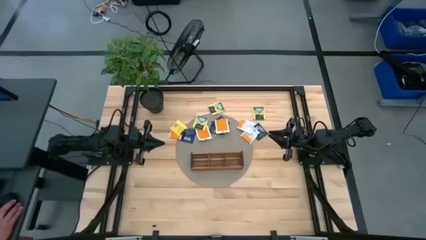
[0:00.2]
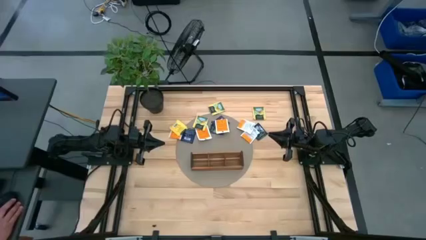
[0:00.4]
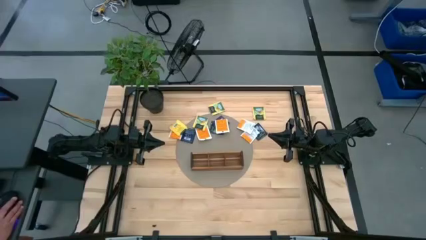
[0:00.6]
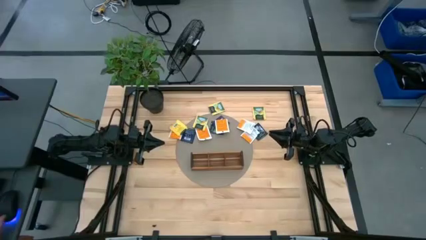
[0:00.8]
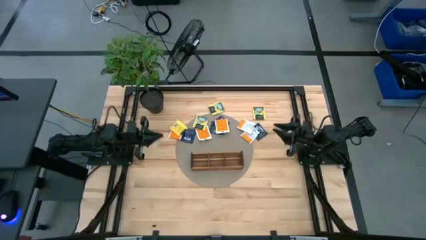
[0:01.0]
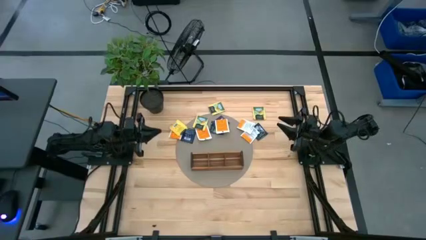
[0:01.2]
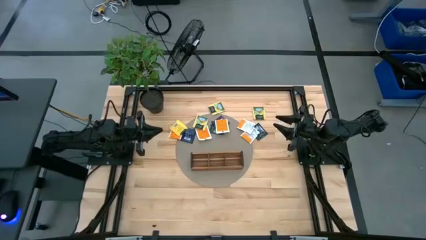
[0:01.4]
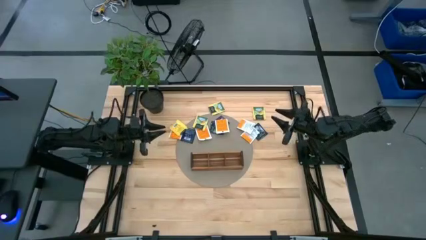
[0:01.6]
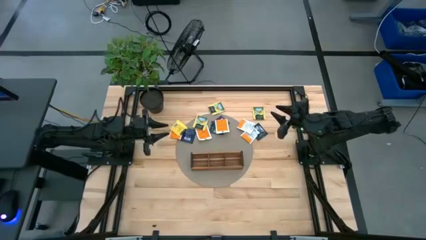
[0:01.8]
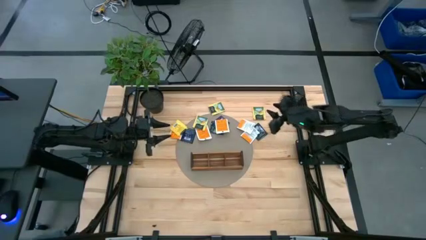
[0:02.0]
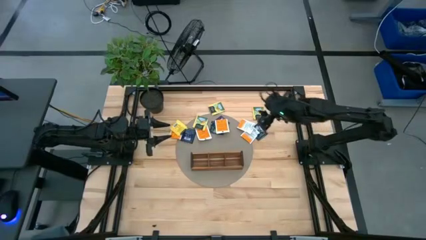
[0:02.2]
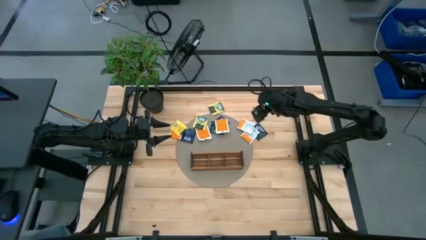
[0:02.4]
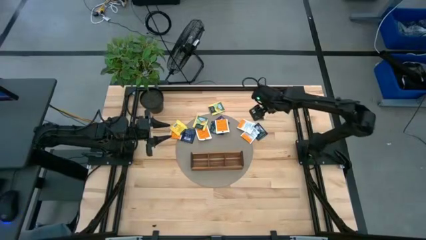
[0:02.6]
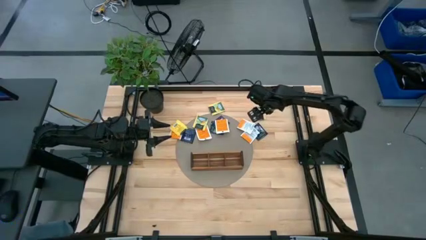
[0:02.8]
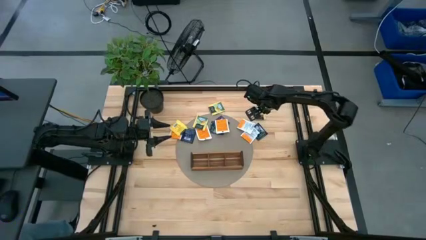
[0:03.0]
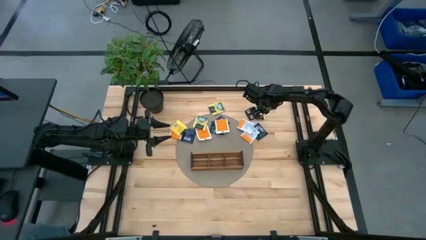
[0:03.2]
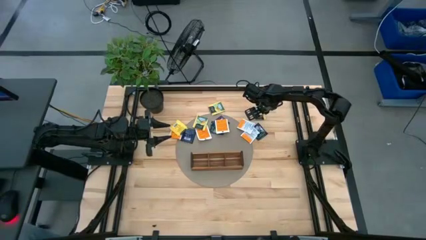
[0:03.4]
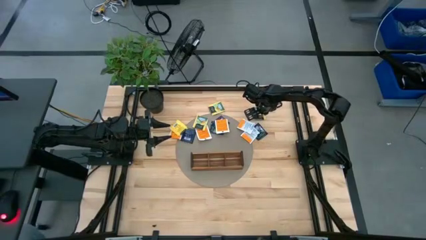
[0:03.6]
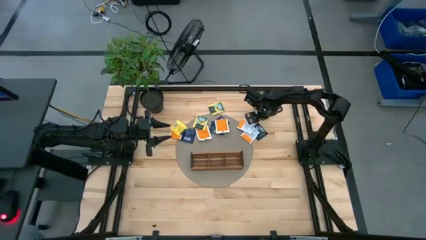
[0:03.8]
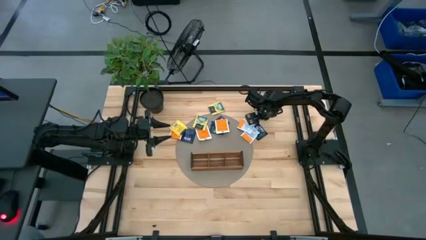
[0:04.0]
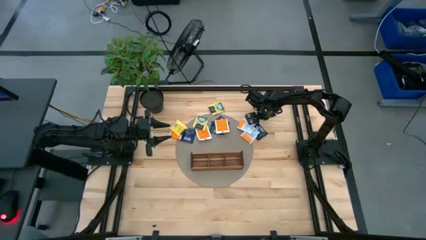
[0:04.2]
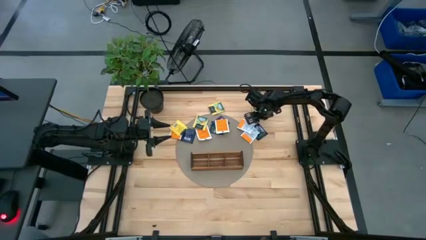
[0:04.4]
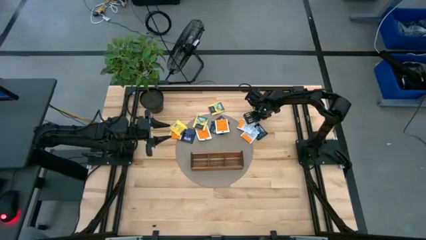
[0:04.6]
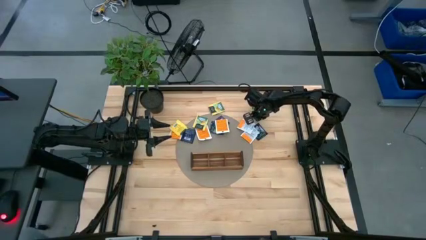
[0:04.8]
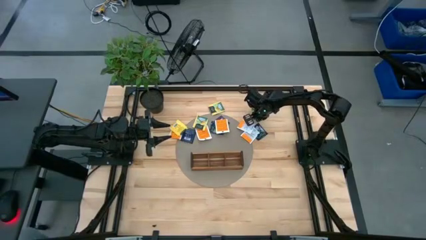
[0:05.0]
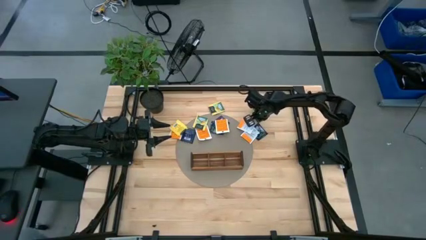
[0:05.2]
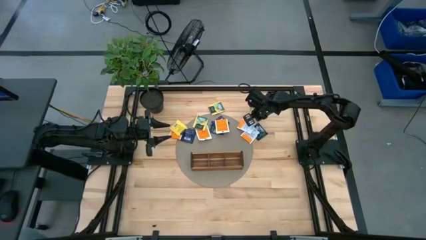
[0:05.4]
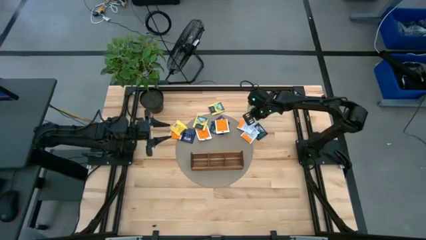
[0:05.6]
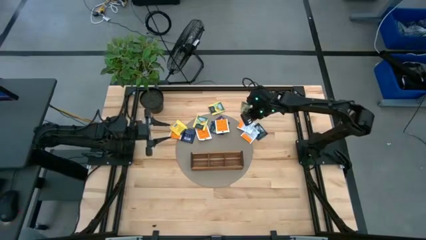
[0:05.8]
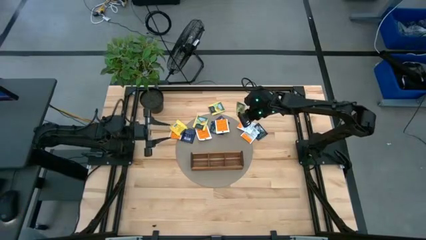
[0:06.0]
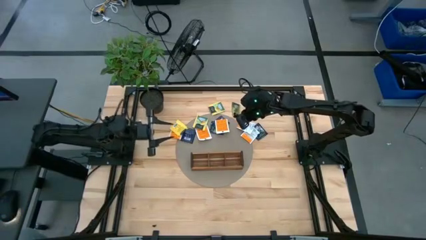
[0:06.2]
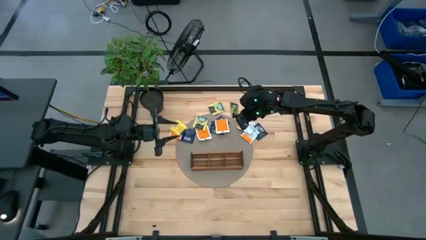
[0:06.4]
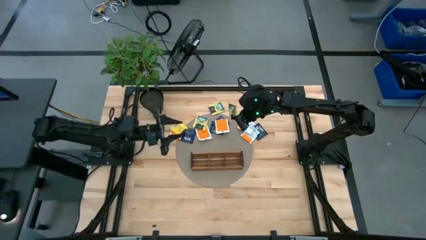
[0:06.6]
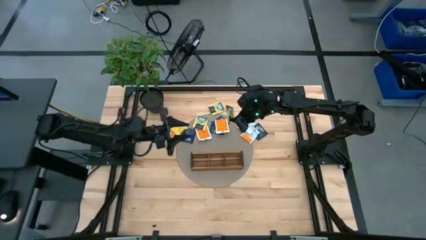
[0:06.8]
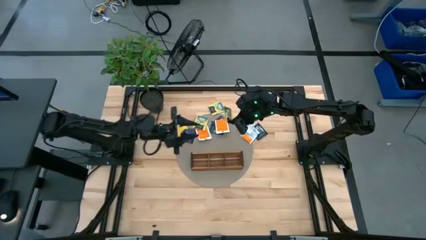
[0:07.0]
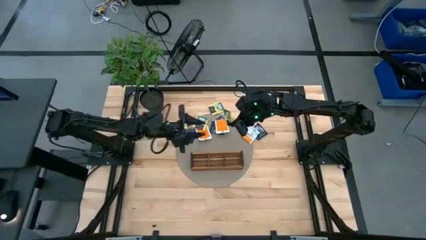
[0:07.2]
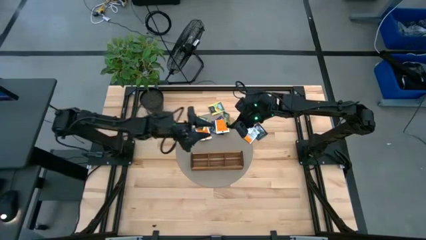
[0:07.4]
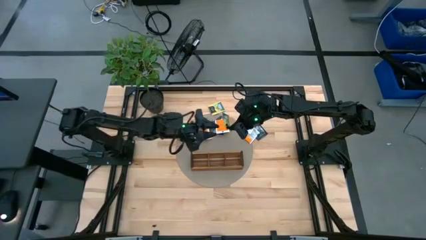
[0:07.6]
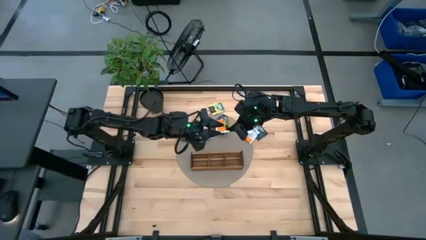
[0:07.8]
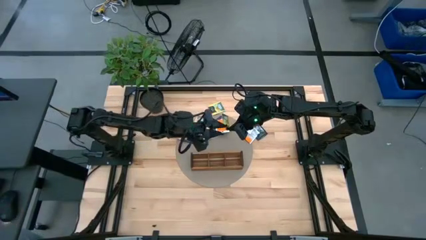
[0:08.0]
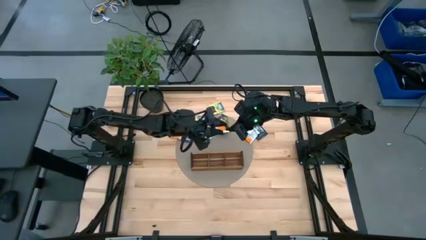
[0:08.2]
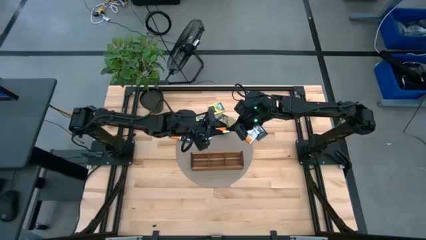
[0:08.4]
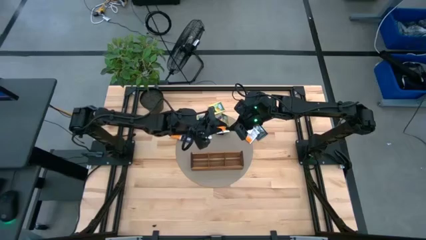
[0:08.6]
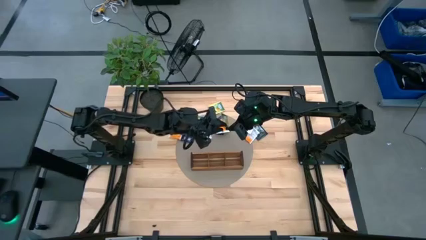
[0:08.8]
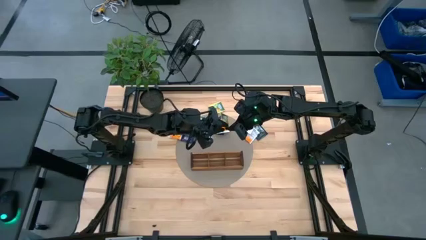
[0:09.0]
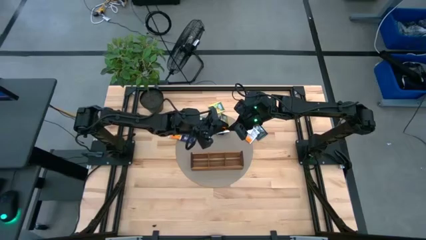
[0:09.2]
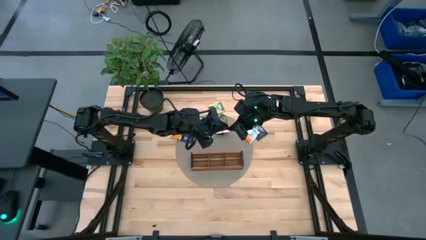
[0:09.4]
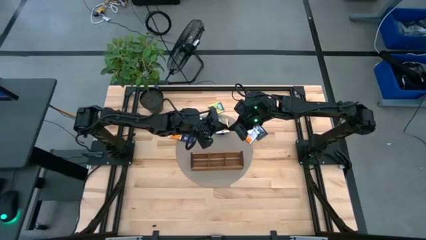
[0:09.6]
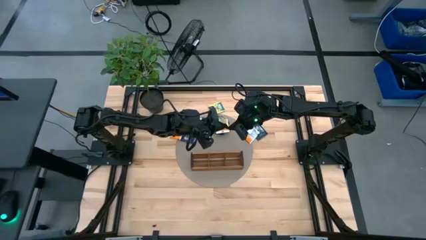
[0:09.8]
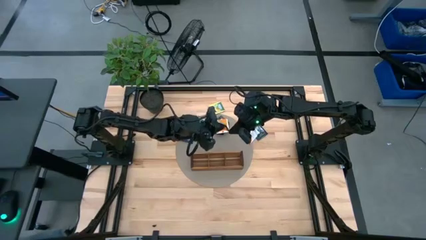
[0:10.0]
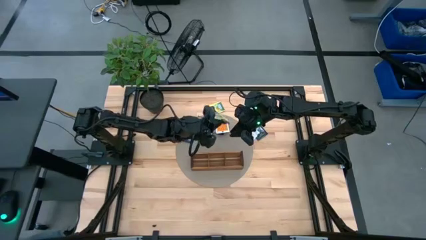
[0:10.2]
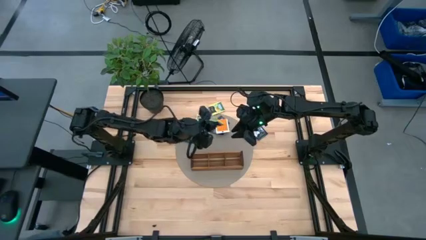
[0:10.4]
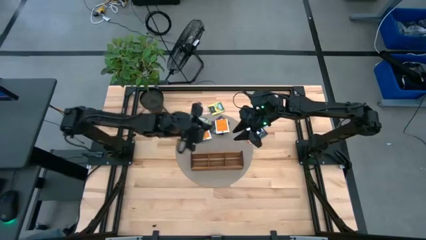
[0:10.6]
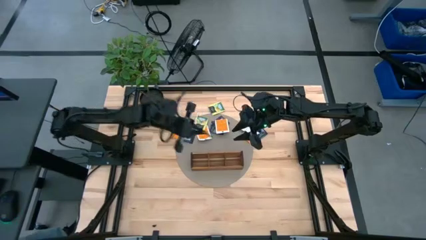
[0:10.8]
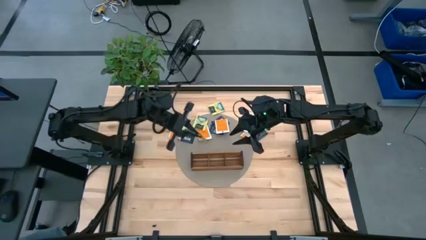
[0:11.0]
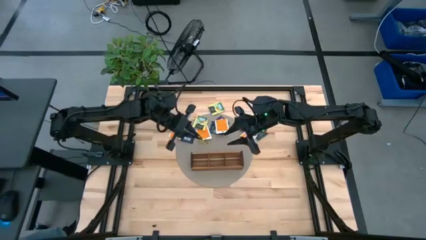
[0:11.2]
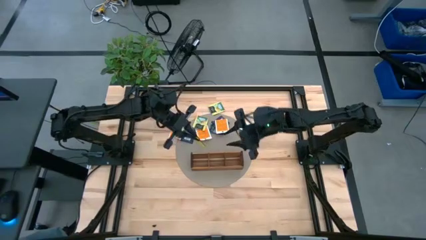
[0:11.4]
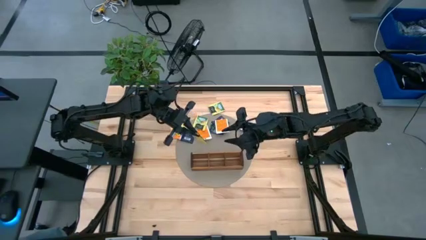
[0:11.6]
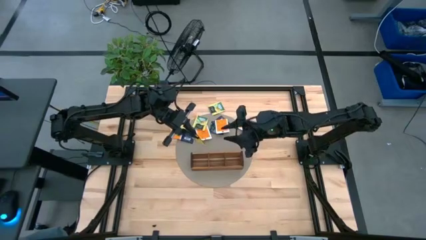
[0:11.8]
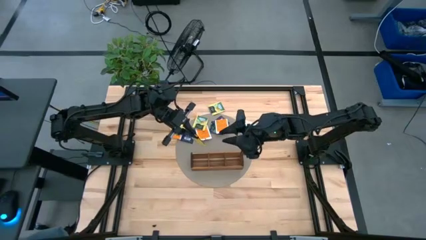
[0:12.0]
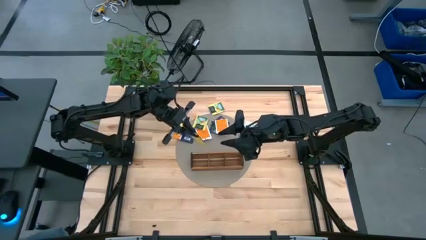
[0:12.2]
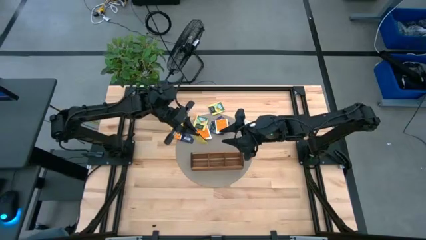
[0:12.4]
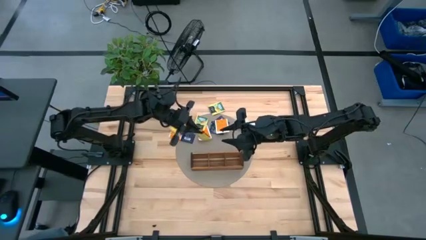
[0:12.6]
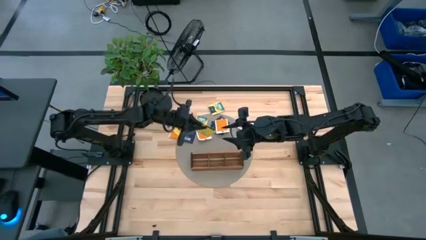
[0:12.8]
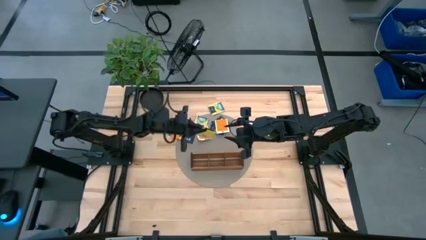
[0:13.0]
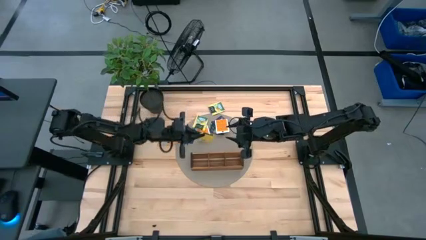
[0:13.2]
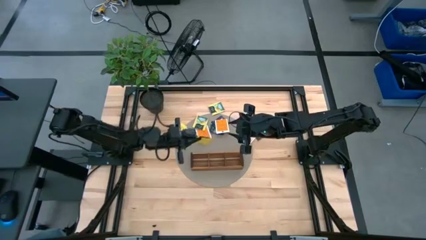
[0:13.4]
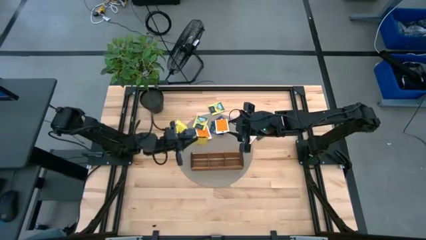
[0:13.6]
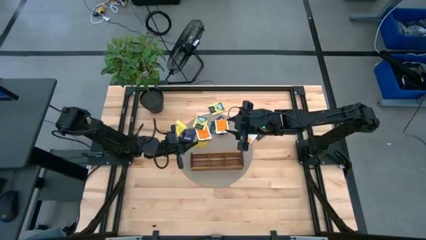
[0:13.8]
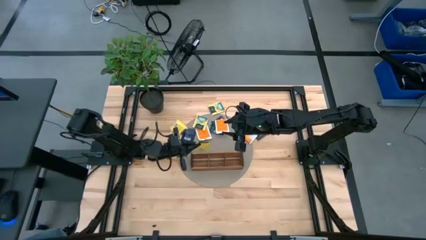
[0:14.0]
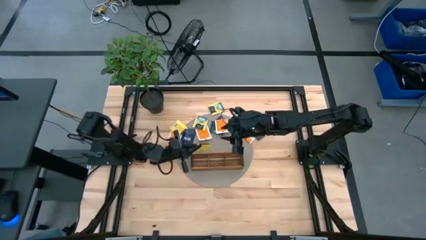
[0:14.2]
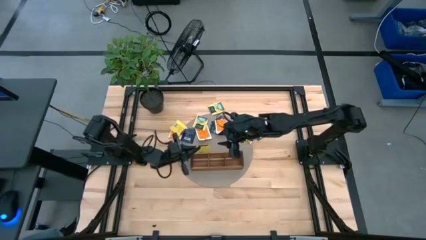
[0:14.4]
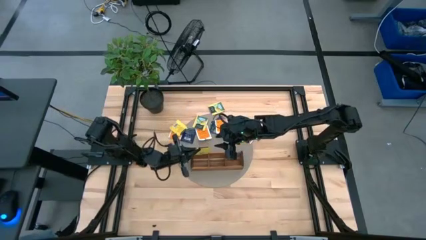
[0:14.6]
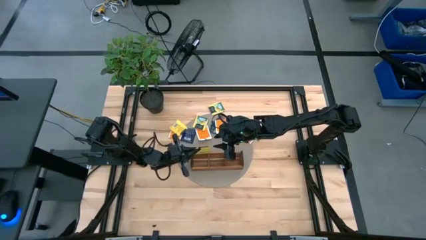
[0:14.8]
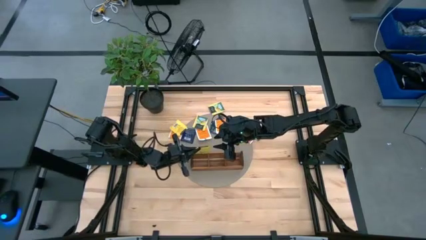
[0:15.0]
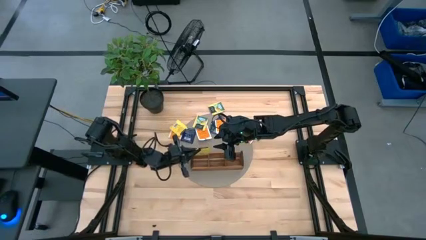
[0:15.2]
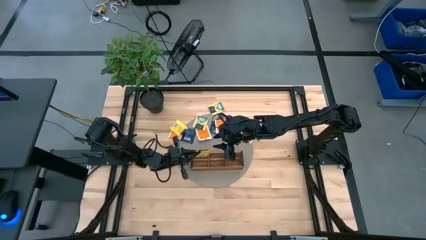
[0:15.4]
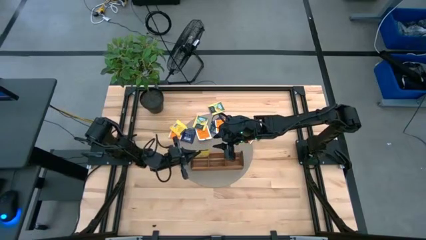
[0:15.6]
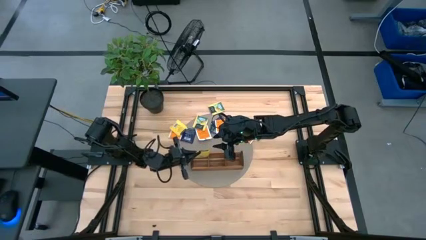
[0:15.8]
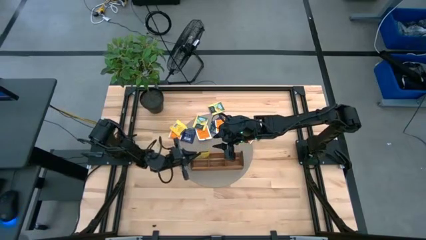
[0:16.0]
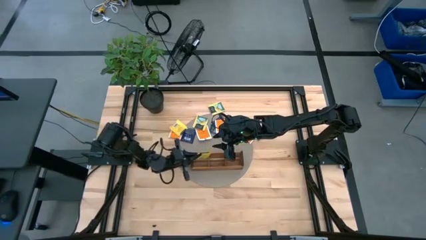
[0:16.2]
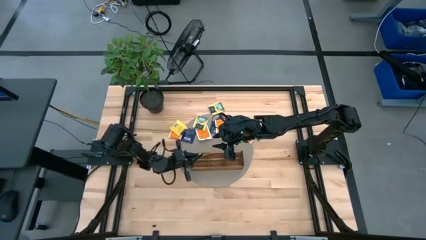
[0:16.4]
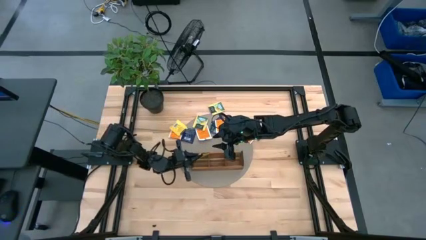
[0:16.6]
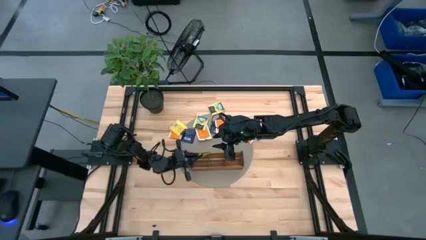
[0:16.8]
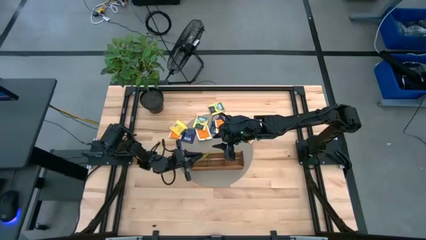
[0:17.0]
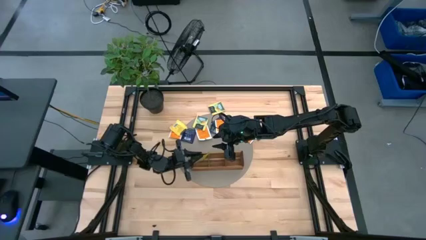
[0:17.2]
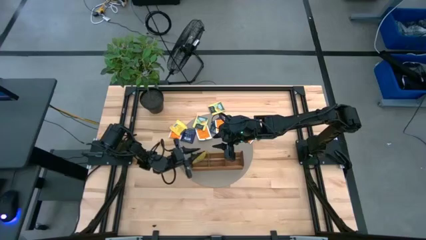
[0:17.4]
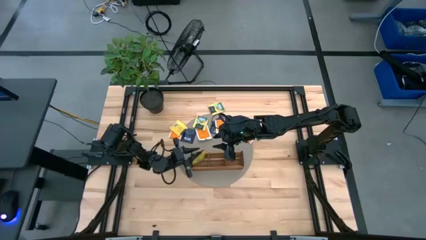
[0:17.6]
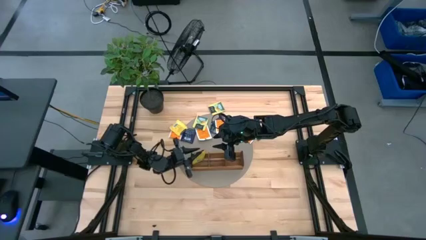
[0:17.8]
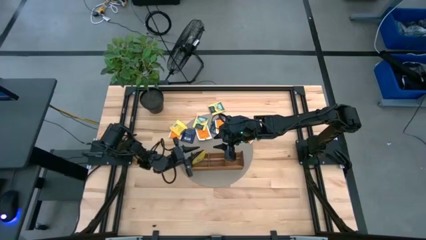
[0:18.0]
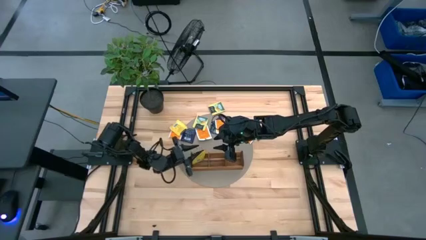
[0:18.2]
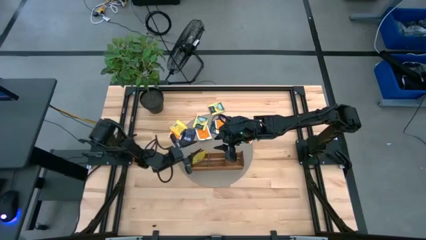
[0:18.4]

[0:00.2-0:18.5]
Task: Pick & Place Tea
Put the yellow tea bag into the left section of the wooden organizer
